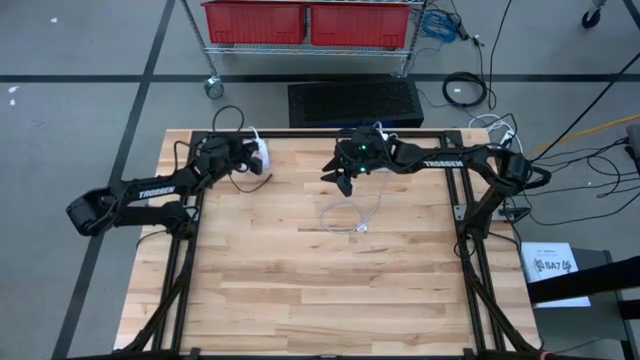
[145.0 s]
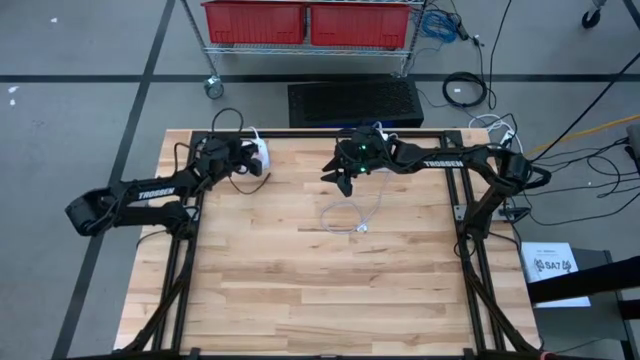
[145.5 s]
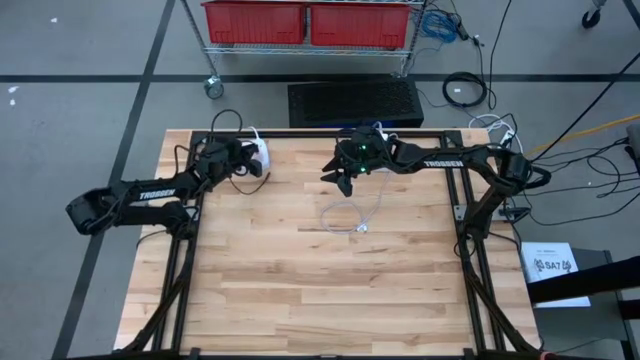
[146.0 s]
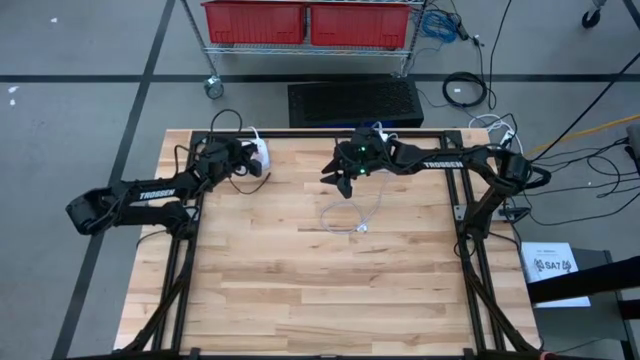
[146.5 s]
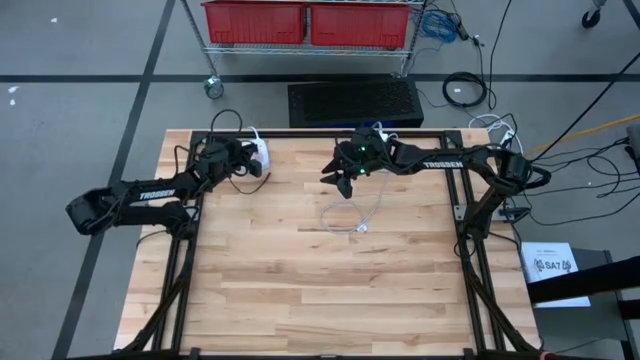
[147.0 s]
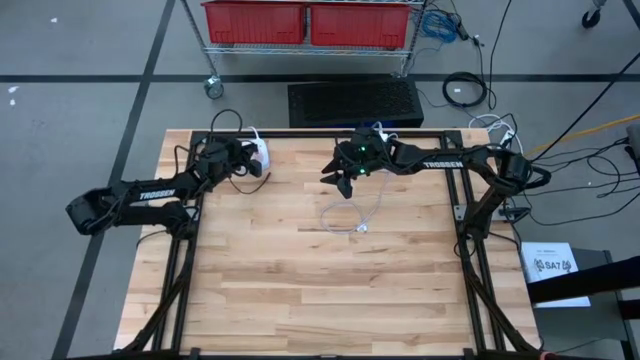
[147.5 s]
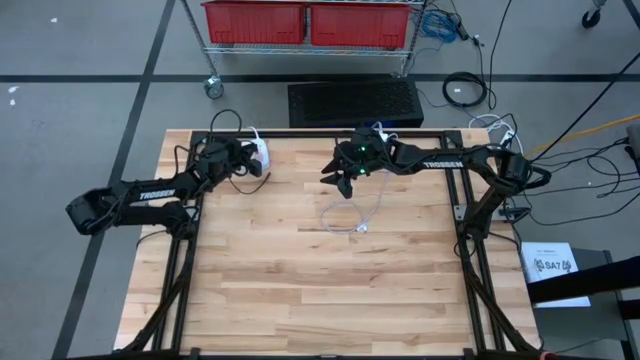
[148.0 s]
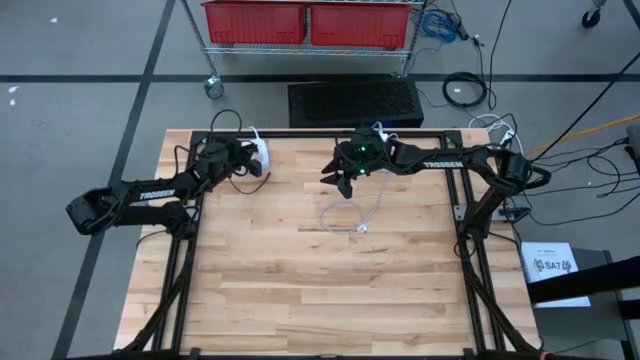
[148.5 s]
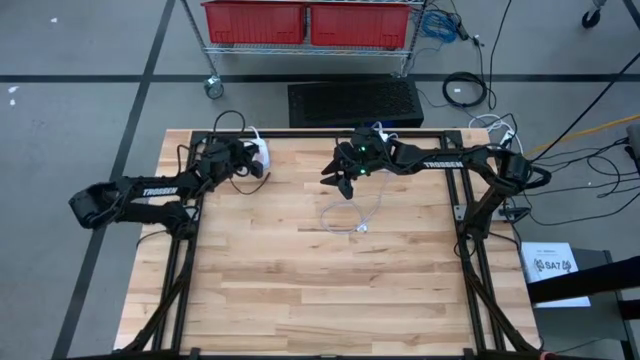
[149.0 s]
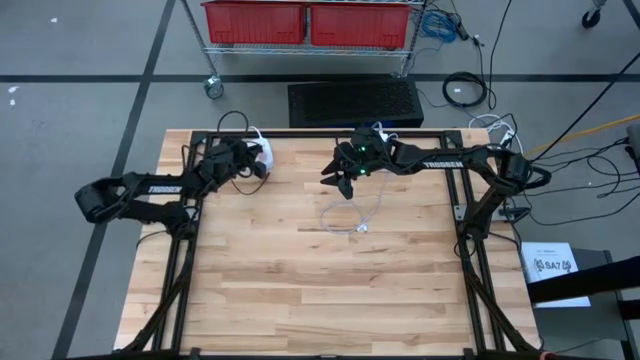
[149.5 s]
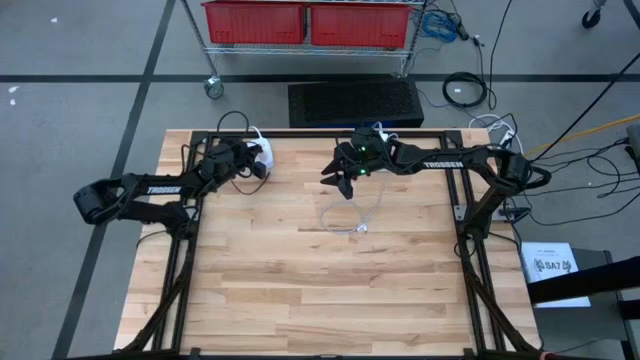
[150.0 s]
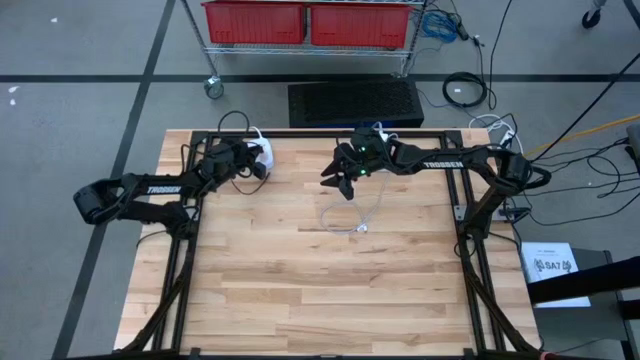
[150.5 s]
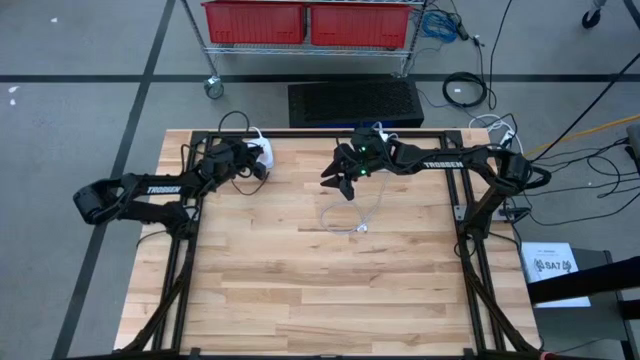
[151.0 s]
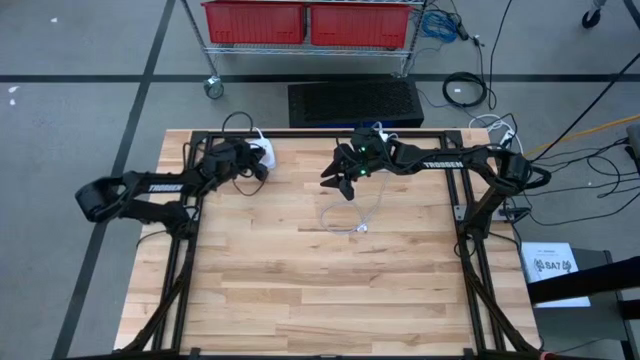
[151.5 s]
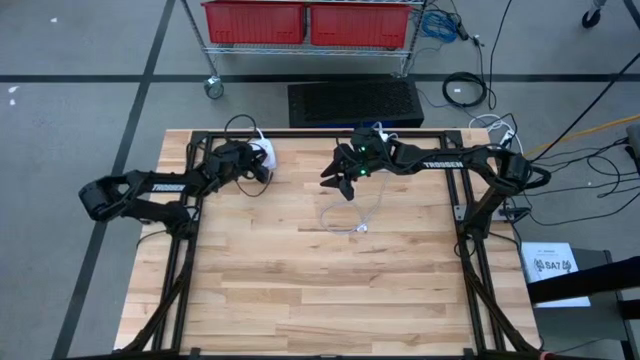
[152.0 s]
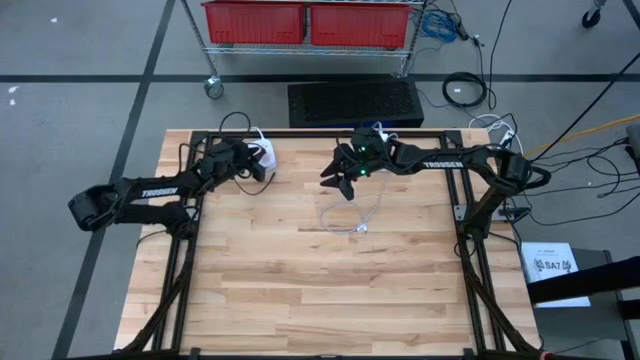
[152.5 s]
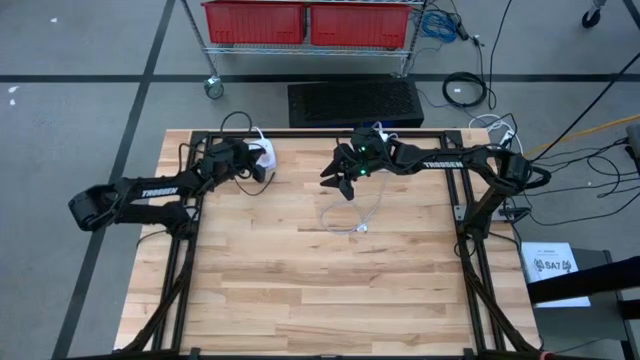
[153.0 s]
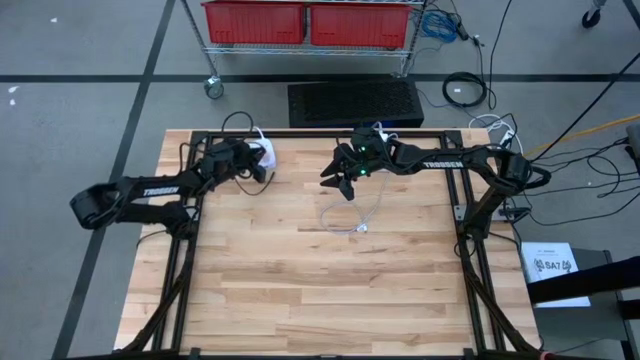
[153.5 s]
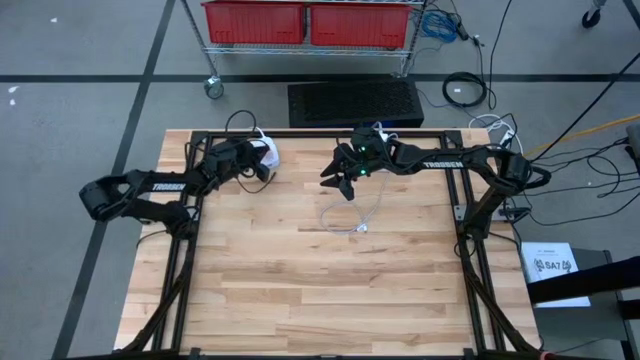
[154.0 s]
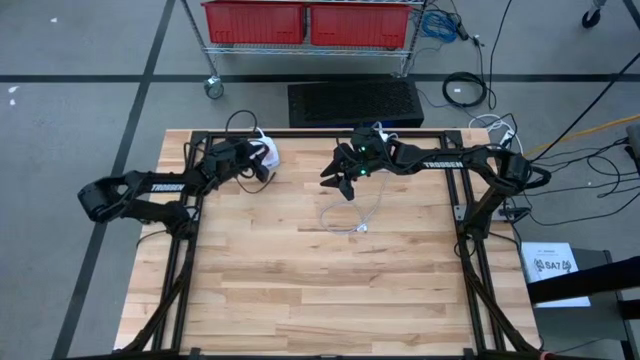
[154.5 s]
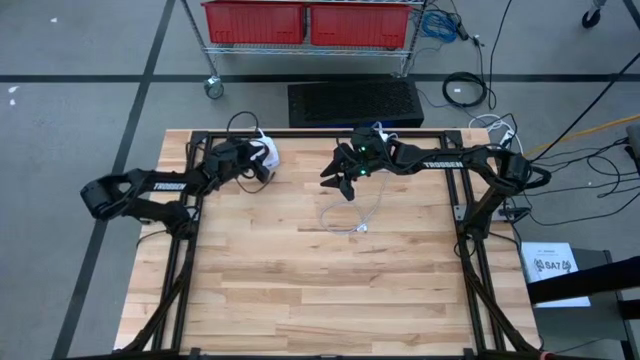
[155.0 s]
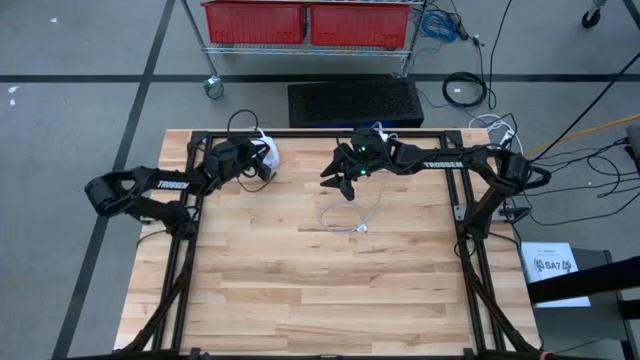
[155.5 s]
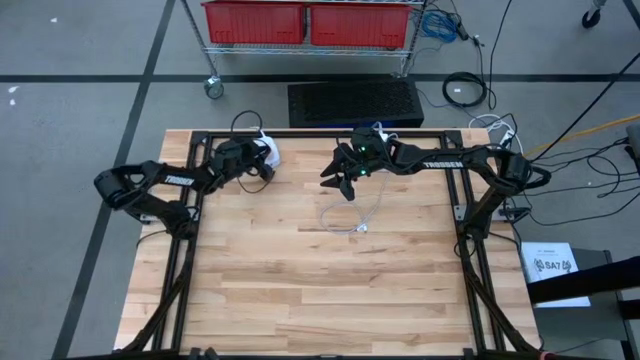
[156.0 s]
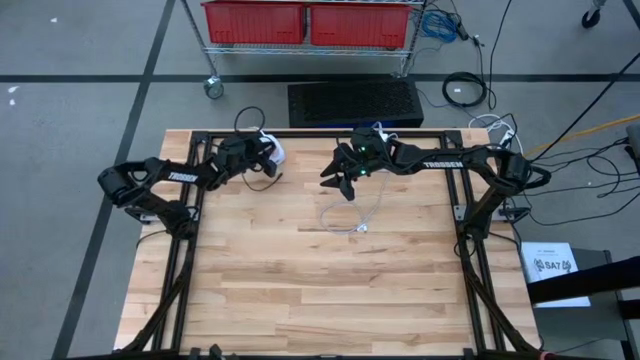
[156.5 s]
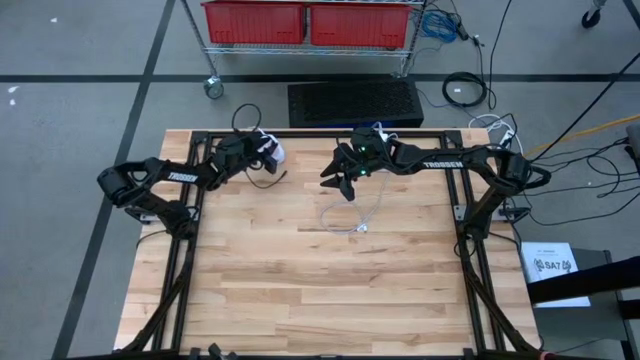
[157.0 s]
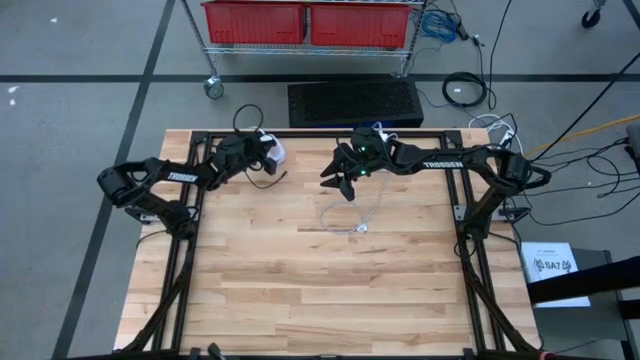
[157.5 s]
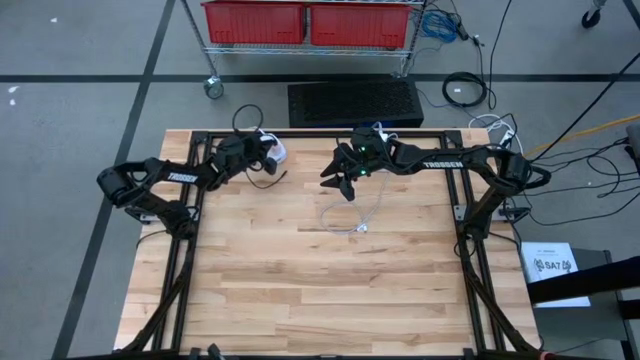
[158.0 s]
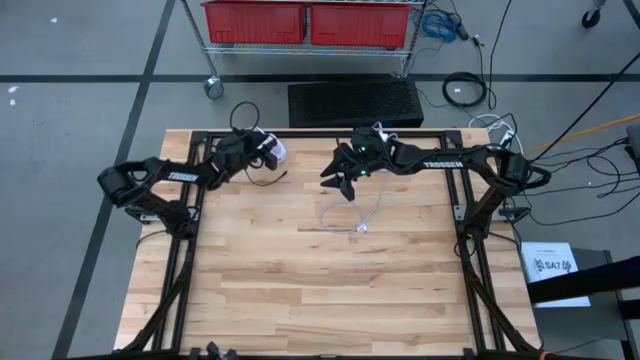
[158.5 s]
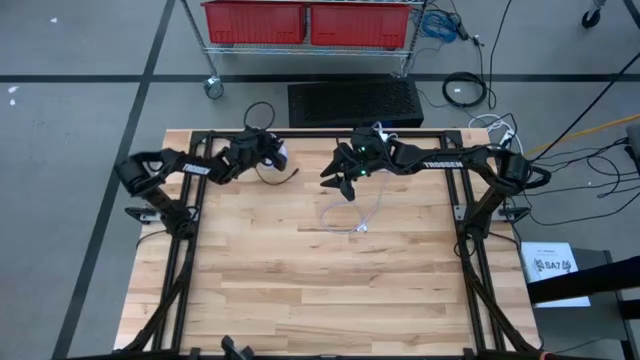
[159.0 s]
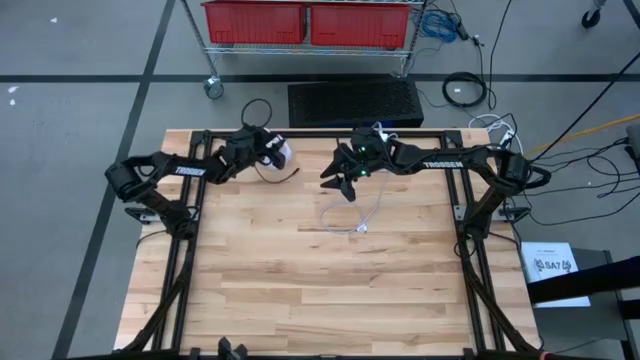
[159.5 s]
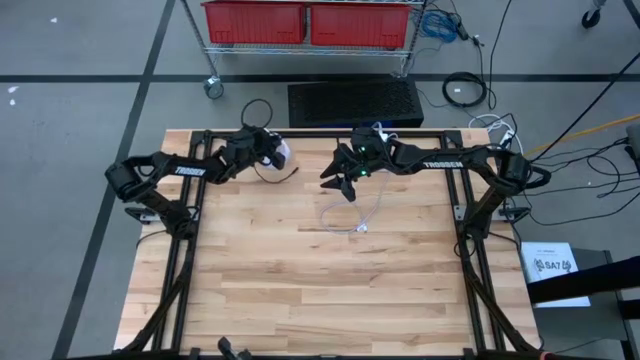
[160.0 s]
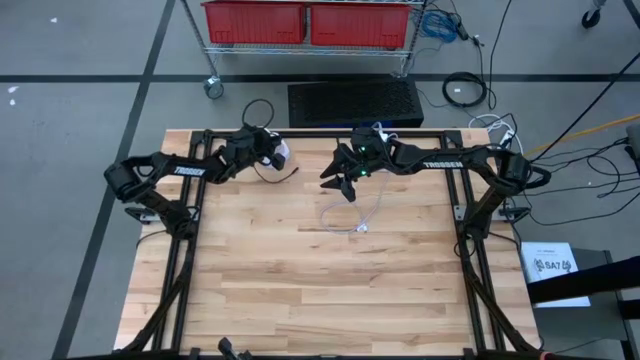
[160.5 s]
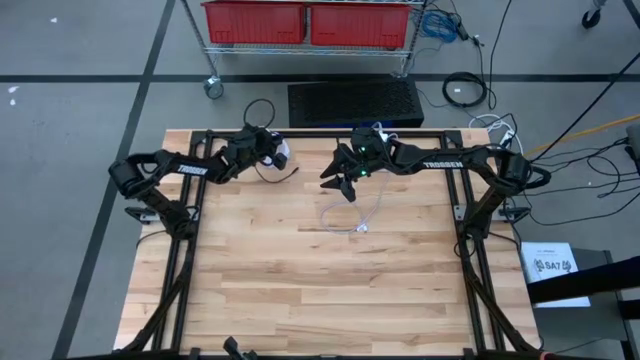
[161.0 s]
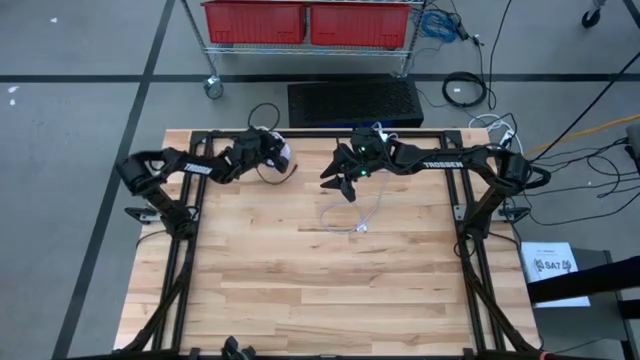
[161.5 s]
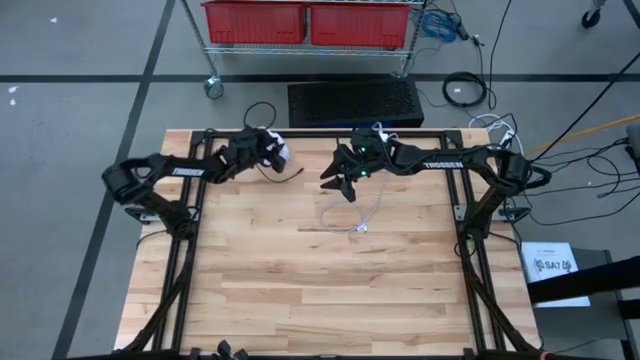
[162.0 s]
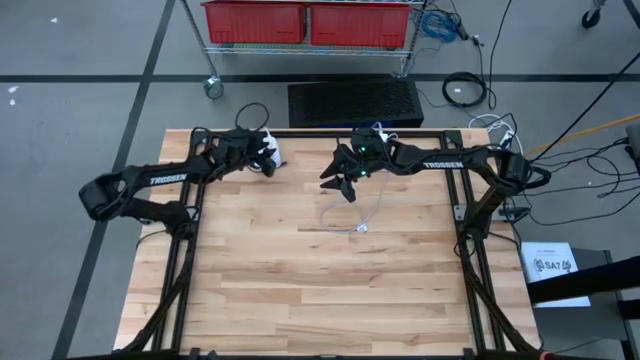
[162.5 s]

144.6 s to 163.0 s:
Task: Insert USB
Insert the black charger cable into the orange charger adapter

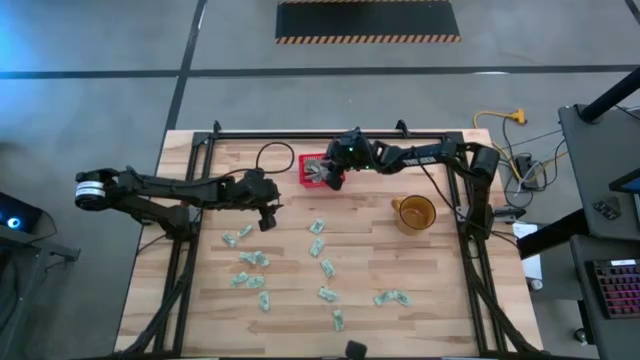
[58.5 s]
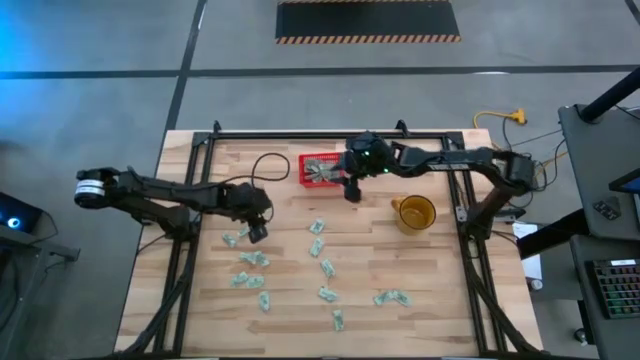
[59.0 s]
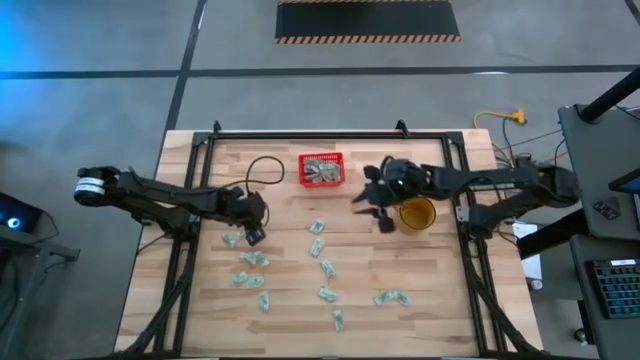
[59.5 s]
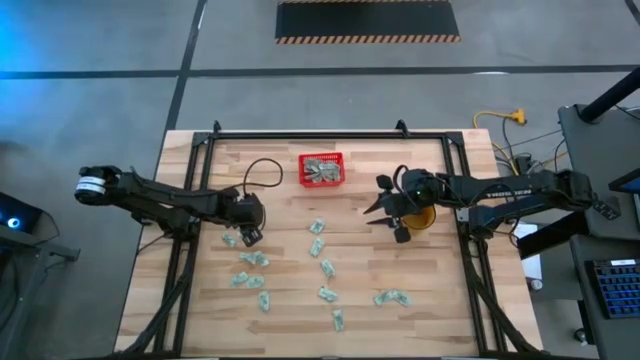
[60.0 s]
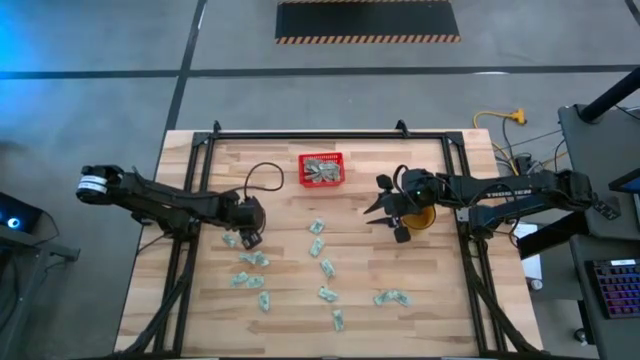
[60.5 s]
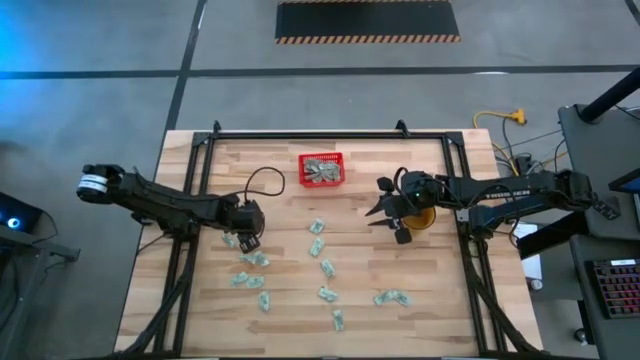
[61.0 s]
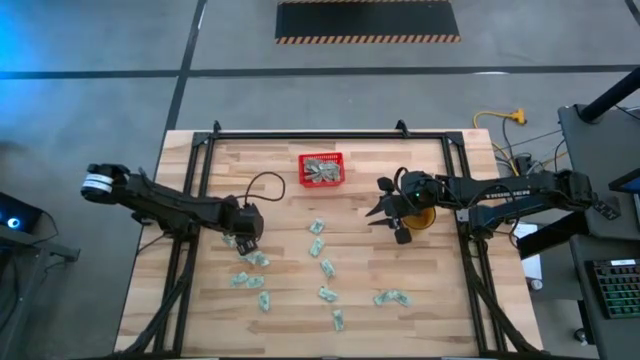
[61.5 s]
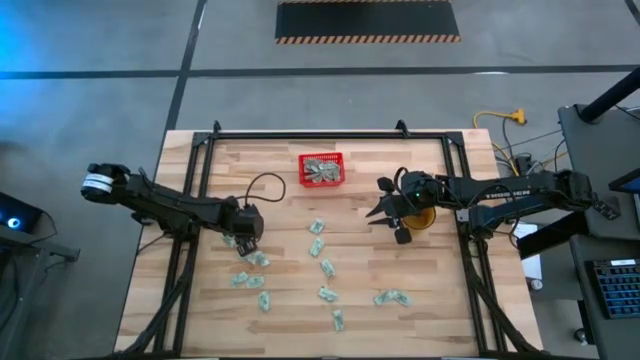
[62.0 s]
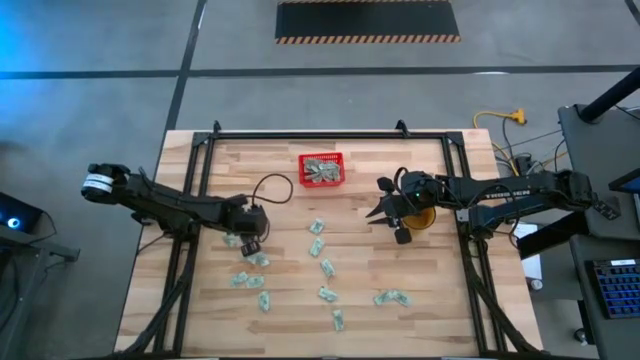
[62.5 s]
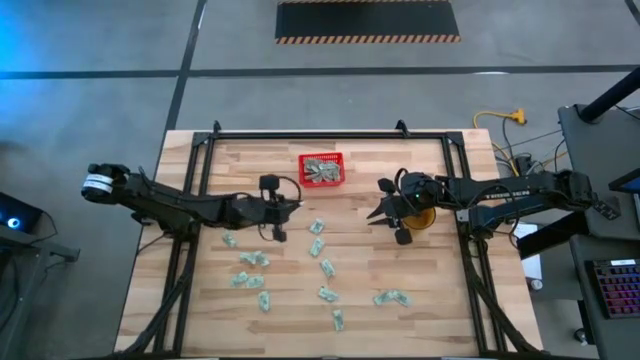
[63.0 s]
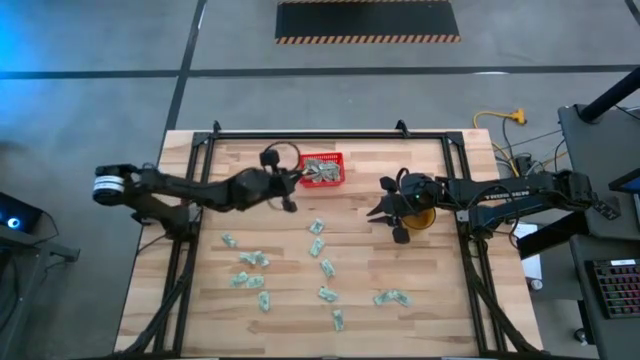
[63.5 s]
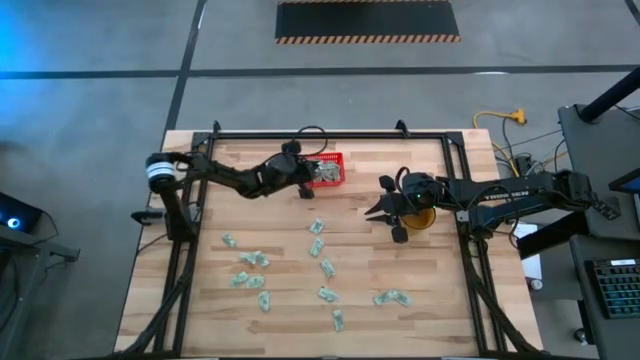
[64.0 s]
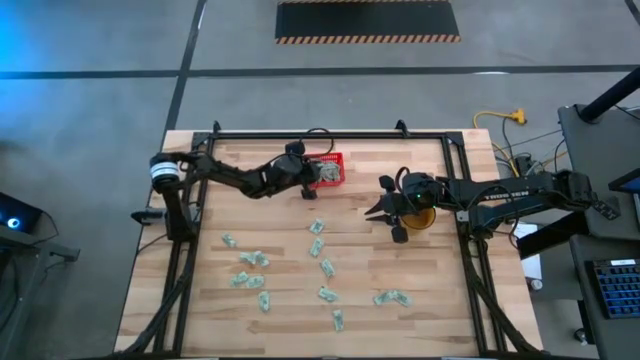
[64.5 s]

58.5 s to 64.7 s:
Task: Pick and place Stevia / Truvia into bins
Put the white stevia packet into the red bin
